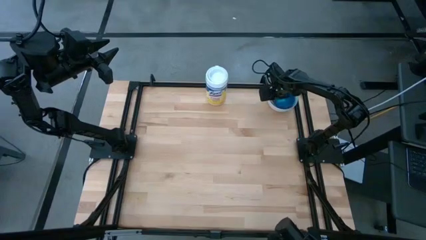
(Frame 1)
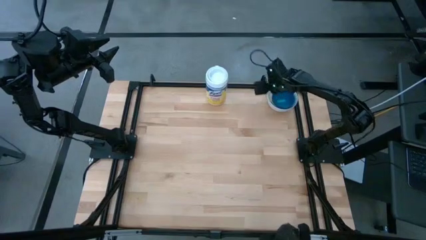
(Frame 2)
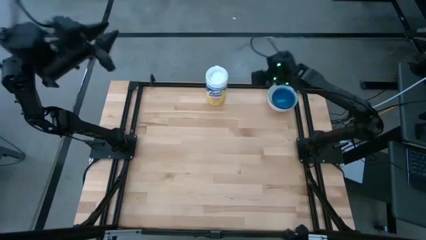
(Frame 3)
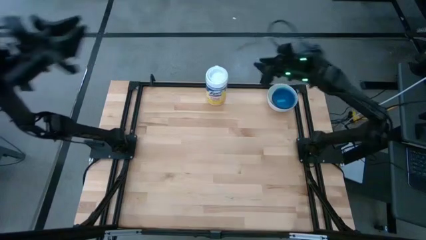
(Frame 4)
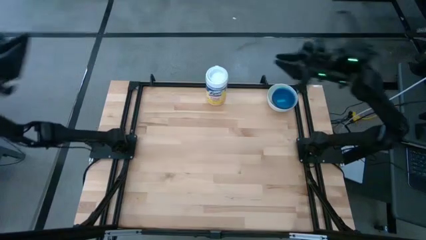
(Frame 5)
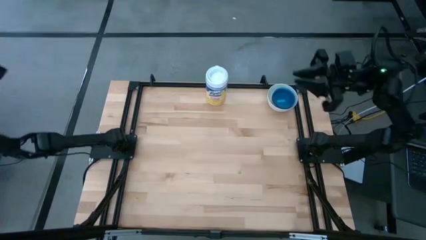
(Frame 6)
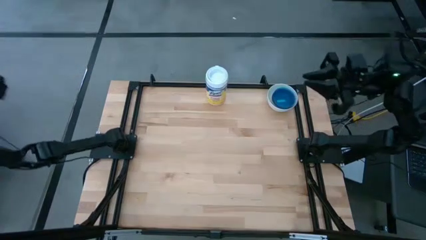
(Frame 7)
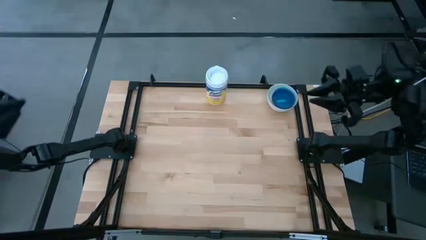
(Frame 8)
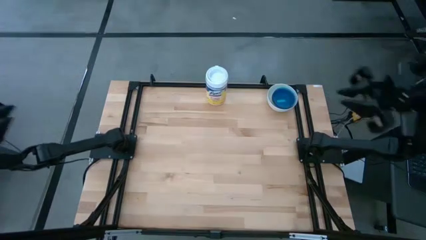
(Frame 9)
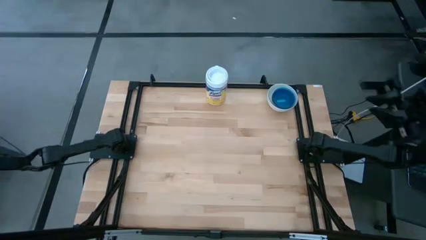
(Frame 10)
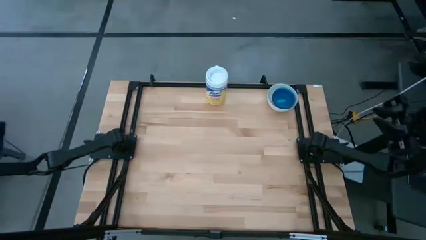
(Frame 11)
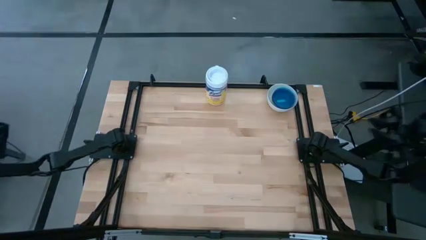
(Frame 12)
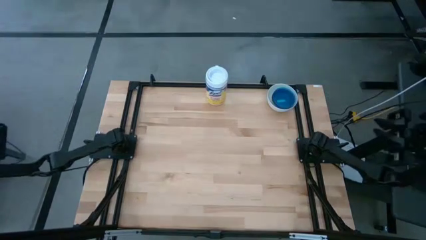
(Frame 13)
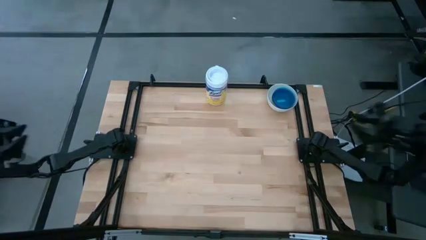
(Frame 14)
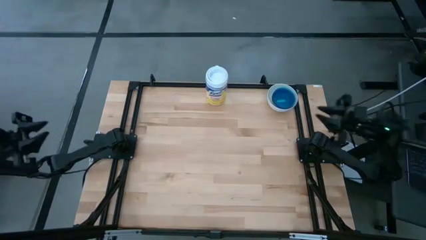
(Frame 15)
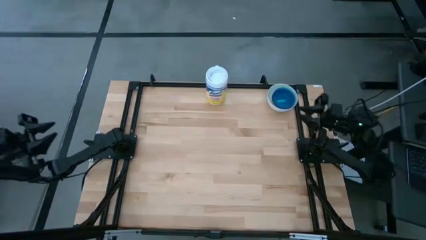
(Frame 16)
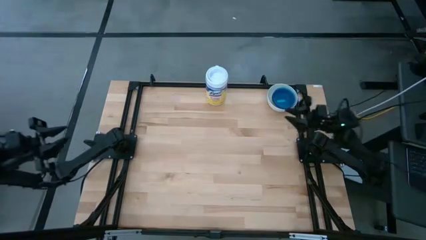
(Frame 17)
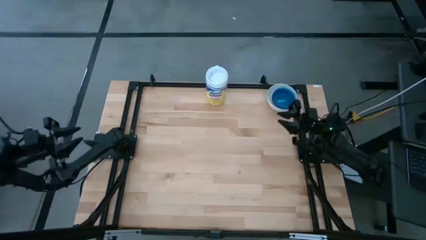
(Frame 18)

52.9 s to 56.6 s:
Return to Home Position

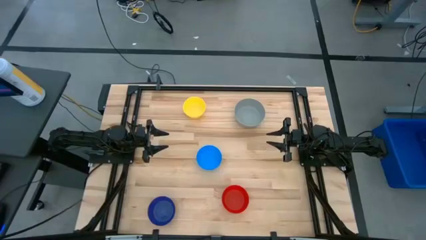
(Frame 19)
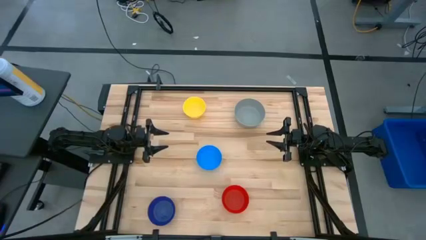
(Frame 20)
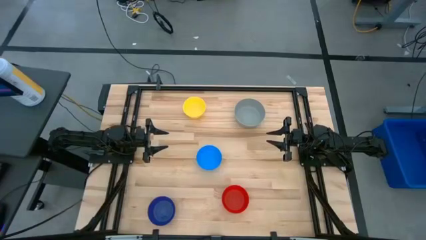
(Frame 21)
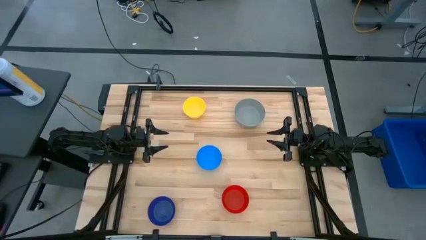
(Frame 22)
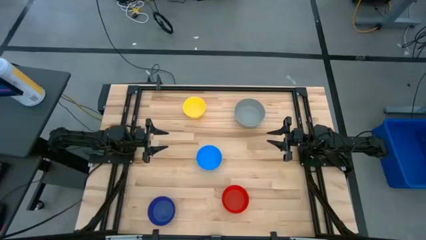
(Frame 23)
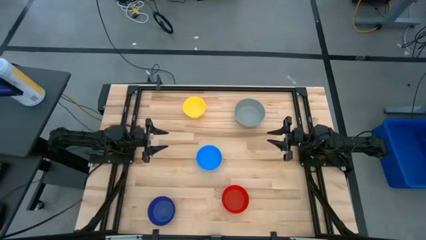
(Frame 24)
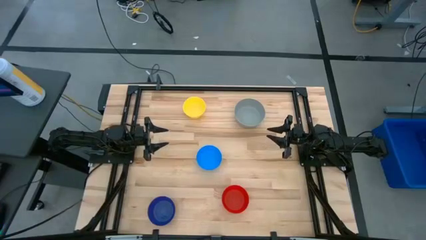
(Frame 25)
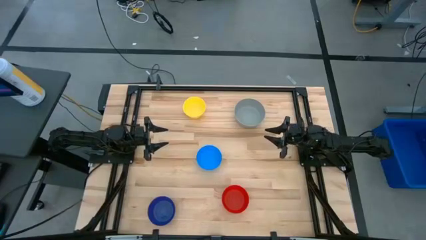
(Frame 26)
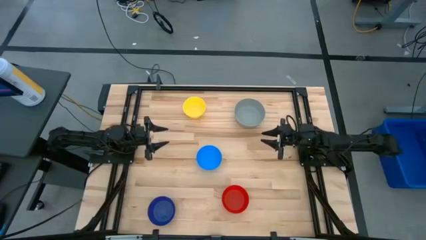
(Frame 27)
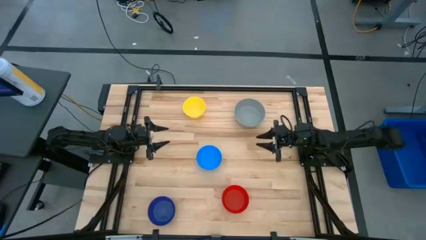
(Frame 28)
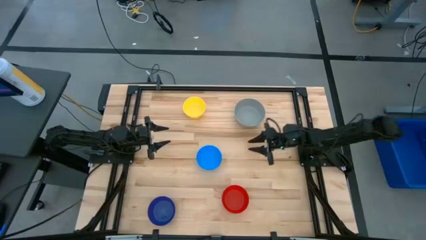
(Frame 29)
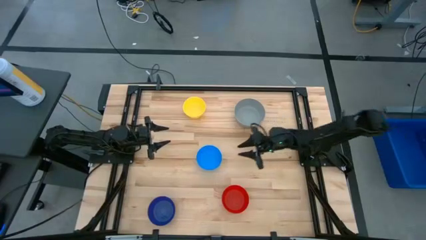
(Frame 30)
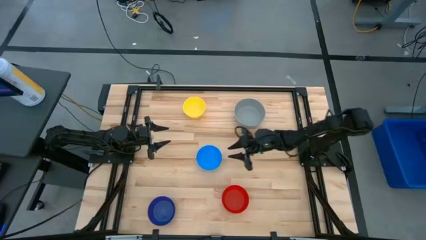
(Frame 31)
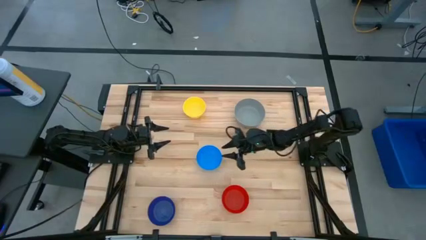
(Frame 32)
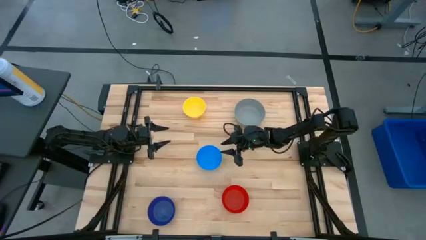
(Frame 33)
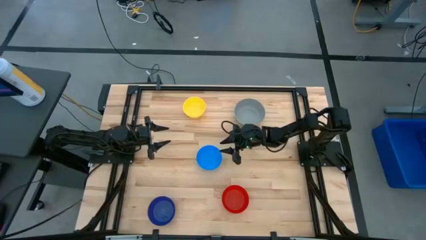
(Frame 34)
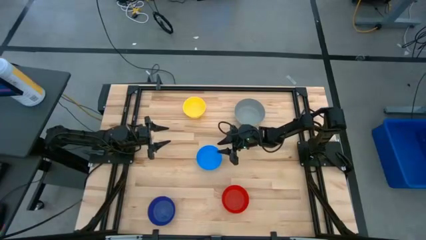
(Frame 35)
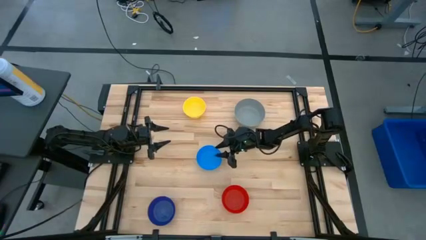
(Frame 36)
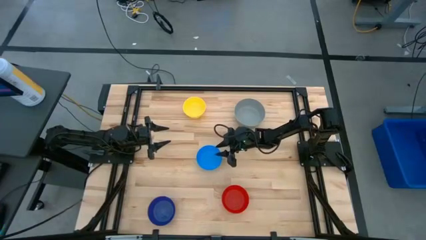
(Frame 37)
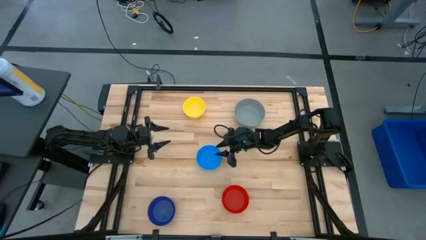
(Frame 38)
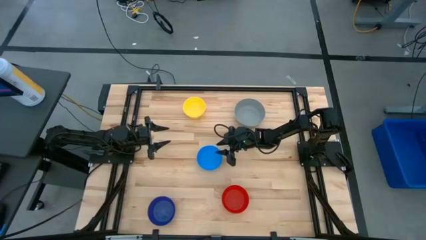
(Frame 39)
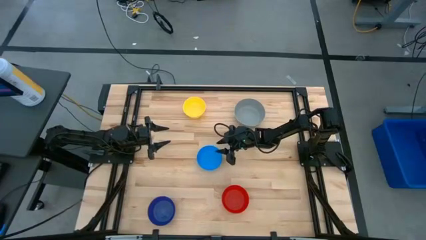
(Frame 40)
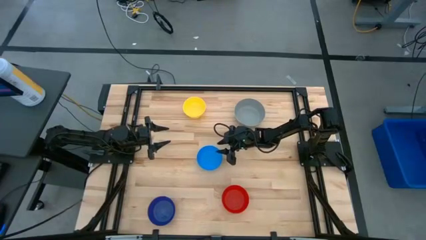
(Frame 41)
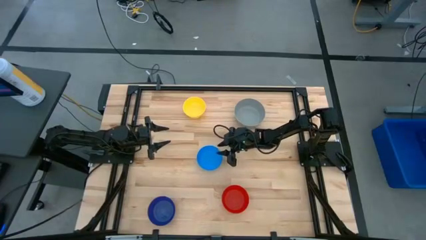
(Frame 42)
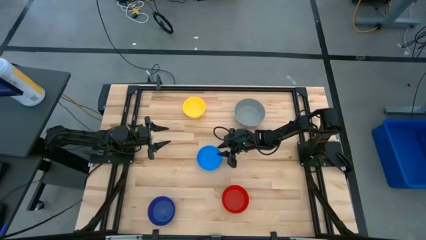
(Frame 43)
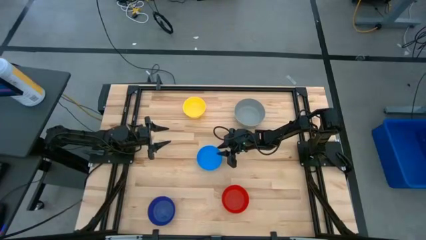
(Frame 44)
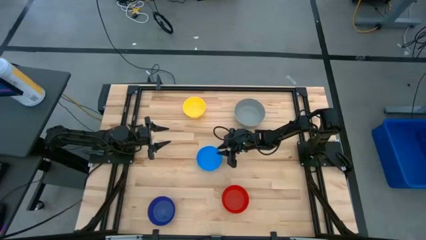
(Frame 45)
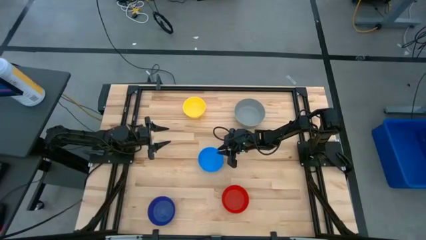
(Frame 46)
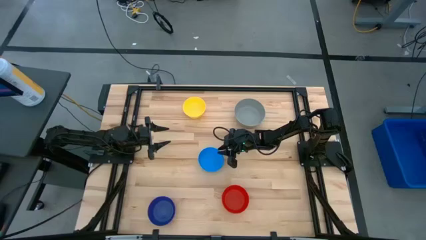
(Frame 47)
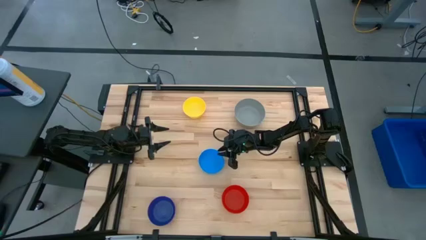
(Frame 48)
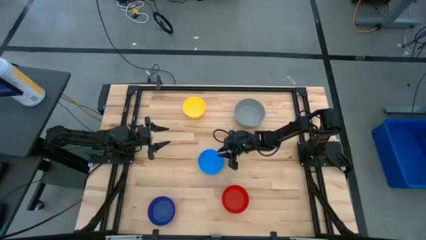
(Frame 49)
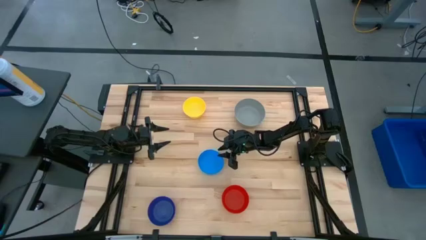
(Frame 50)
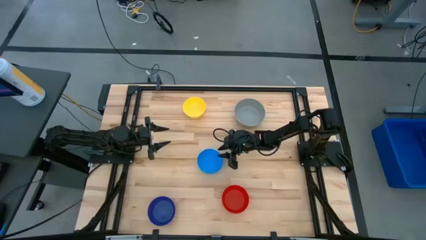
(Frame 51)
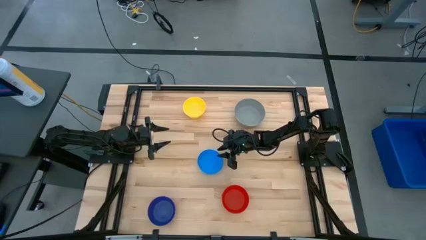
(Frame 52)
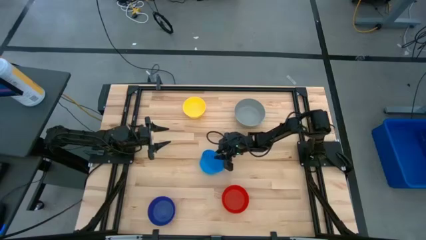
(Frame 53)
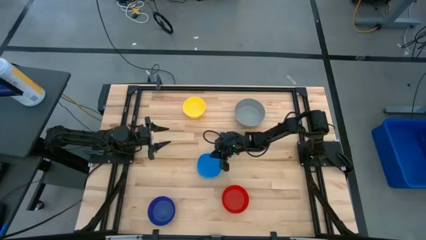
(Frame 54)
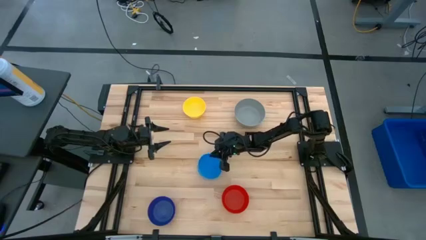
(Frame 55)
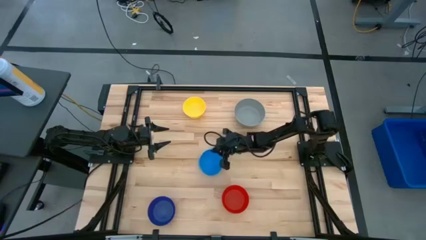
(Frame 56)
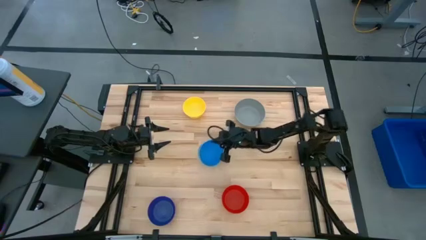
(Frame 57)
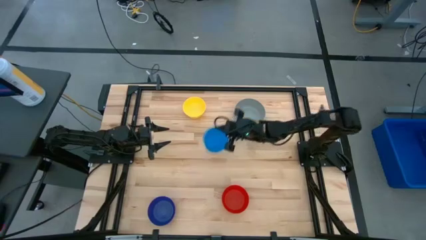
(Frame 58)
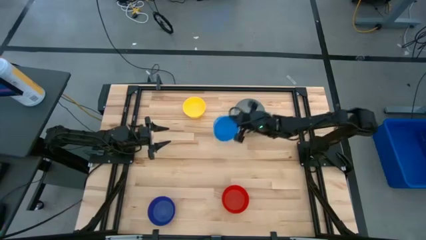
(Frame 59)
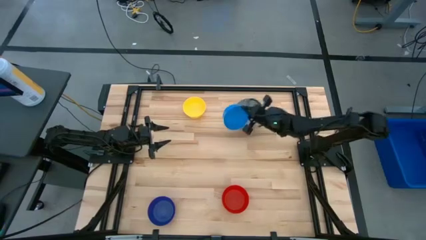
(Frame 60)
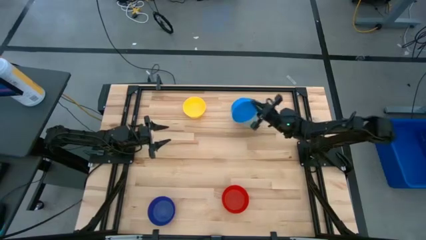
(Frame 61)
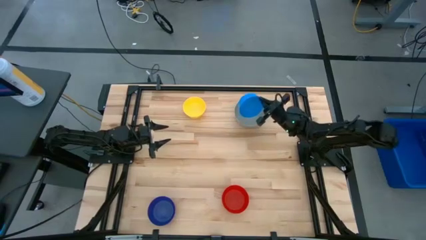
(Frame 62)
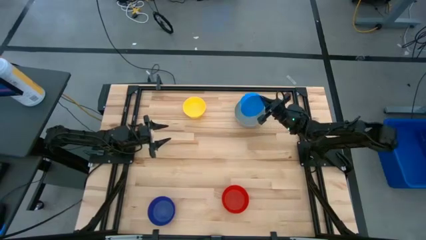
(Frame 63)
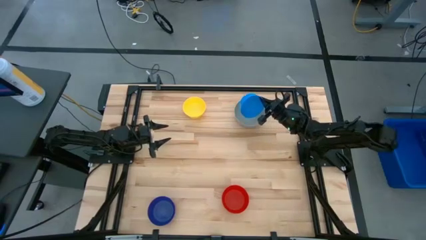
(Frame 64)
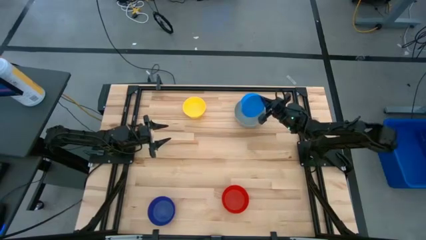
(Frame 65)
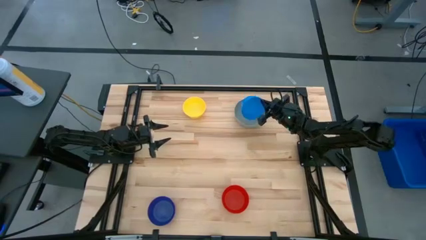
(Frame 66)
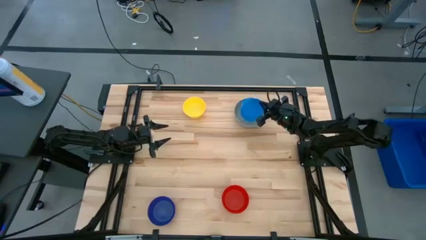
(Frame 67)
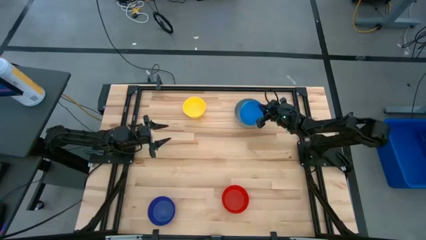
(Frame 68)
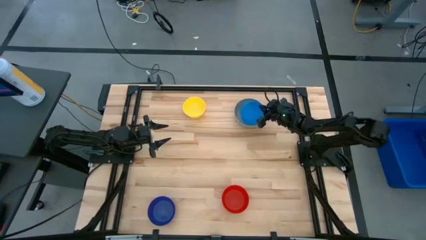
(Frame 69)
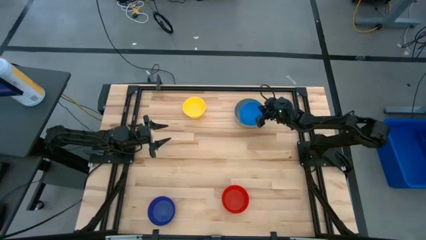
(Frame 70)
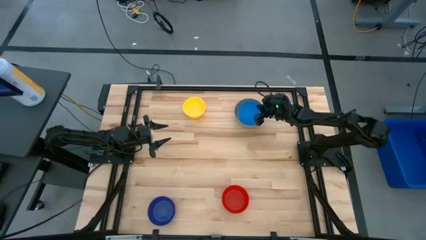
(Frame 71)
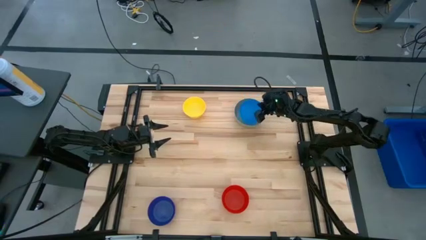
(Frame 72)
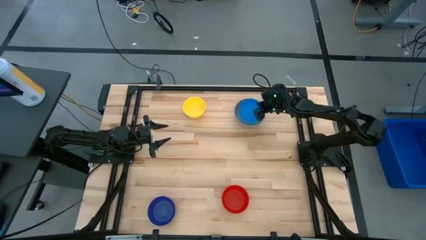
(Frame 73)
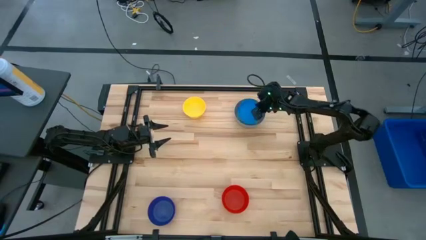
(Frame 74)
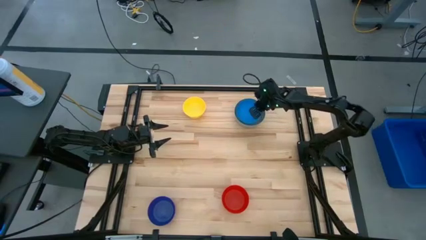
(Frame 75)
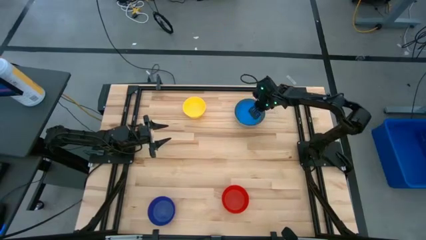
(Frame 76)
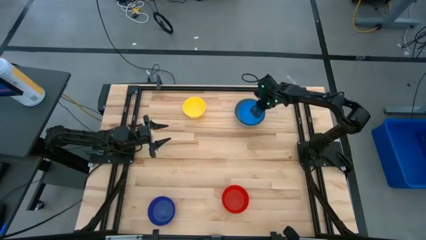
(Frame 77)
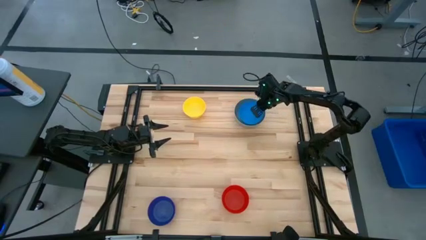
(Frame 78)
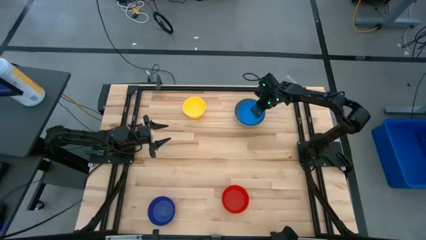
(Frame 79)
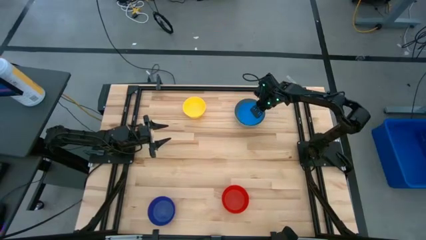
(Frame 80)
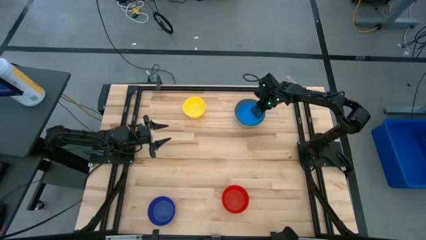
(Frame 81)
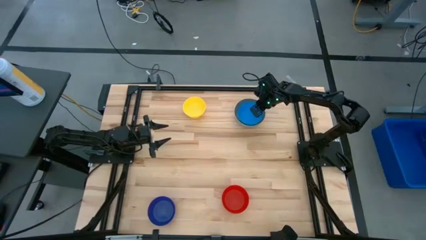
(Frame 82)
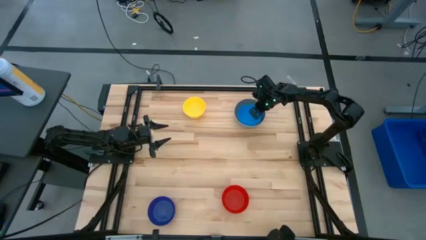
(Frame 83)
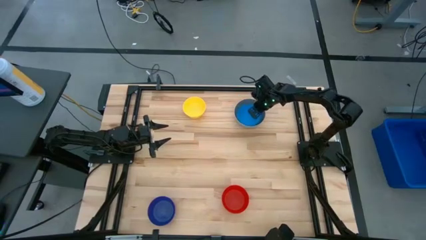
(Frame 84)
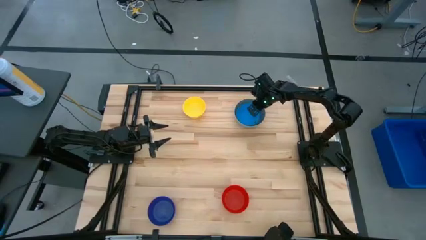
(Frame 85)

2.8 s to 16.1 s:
Stack the blue bowl on the gray bowl
